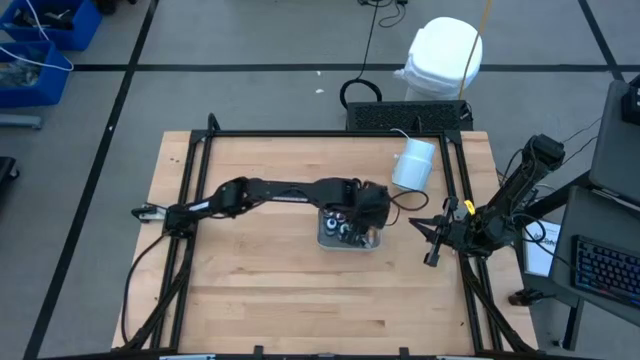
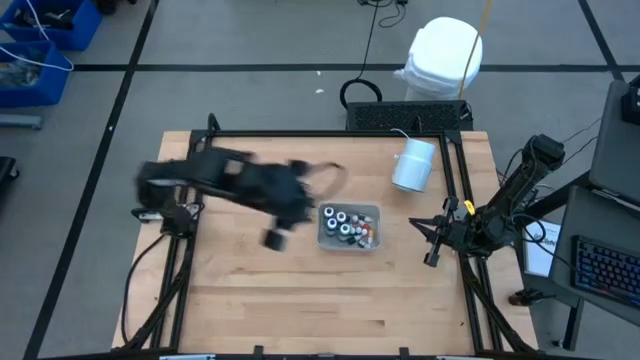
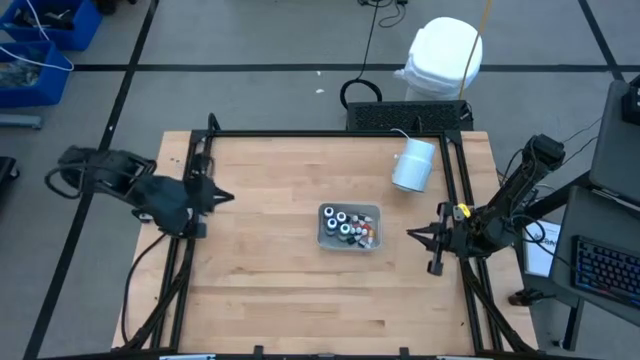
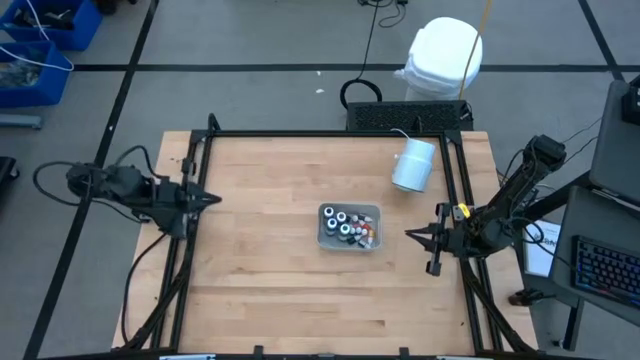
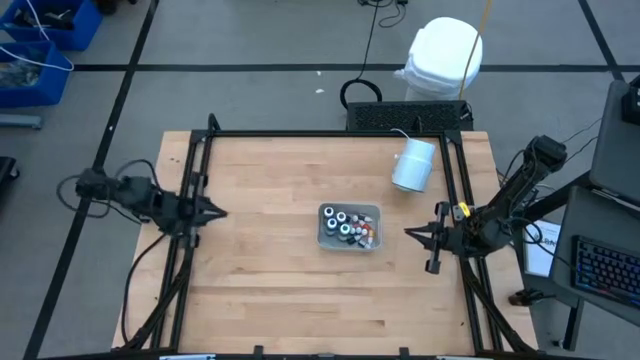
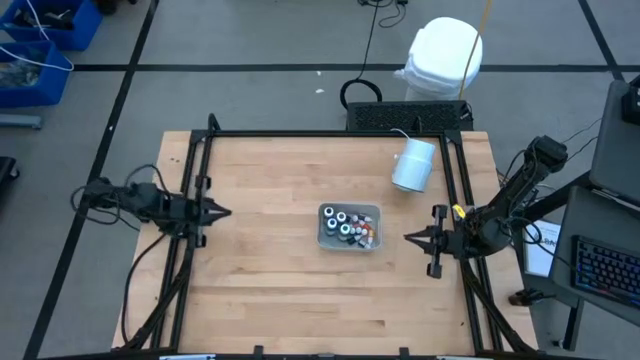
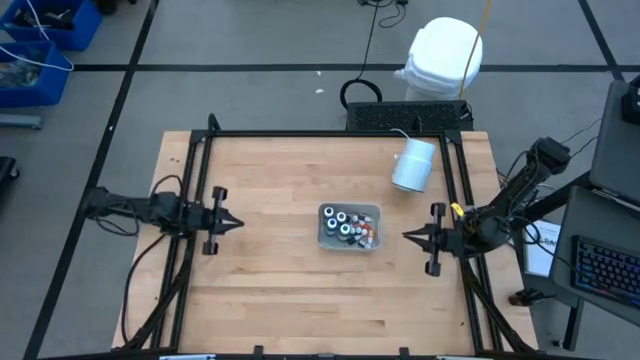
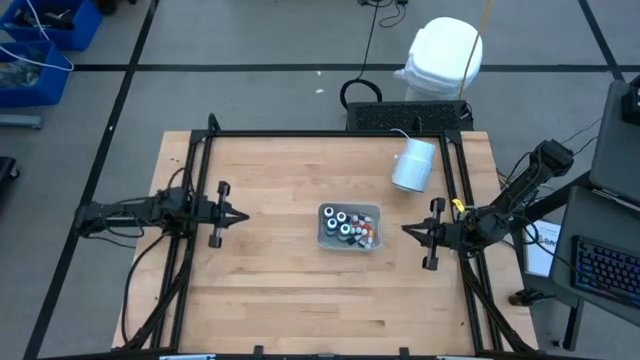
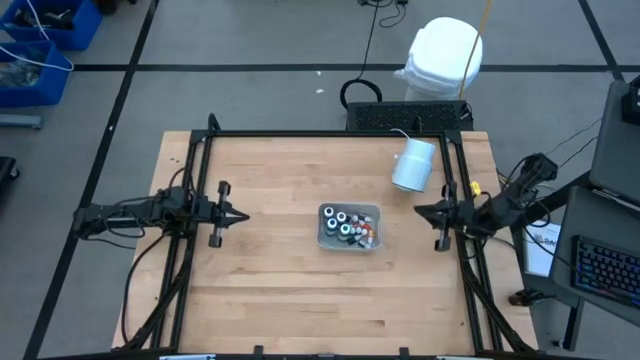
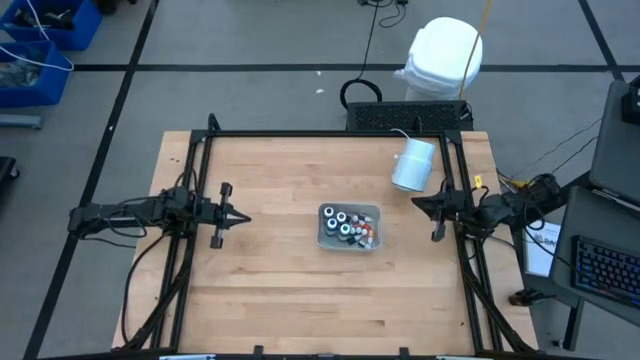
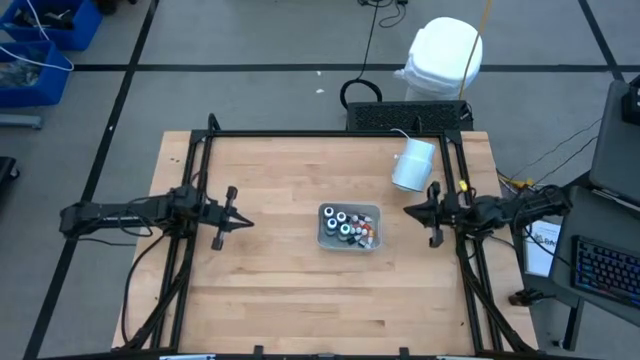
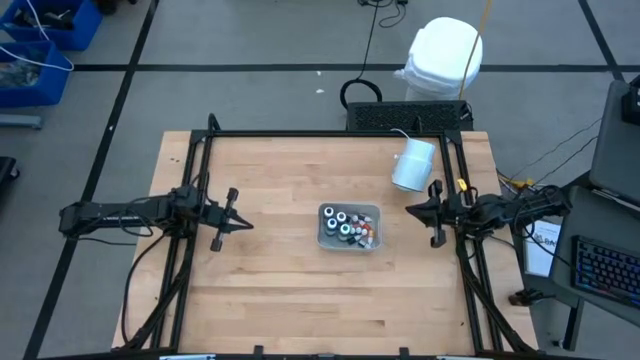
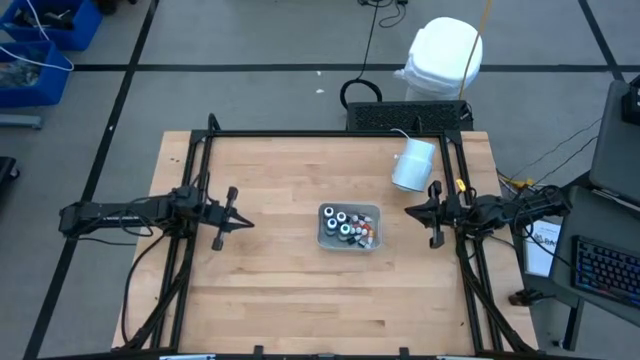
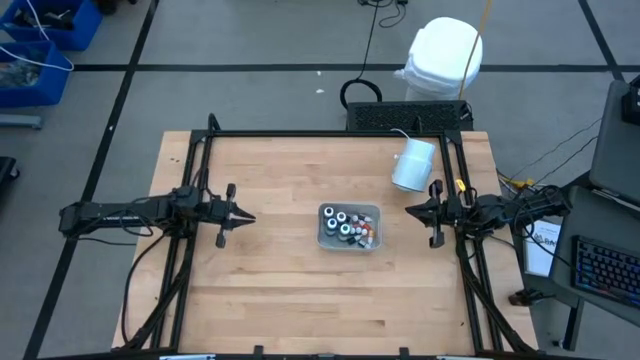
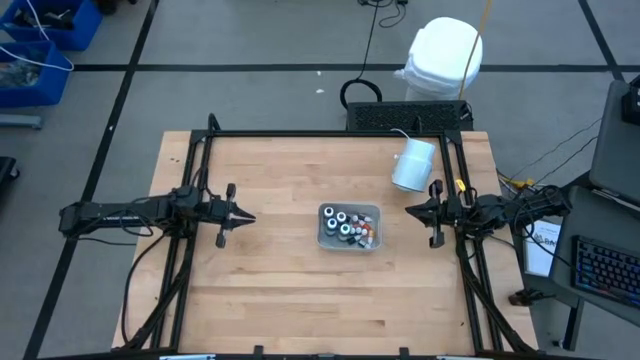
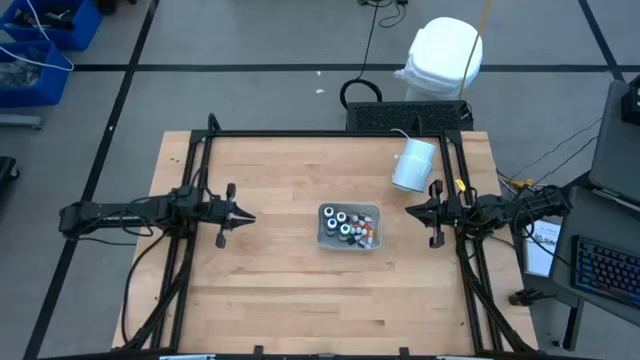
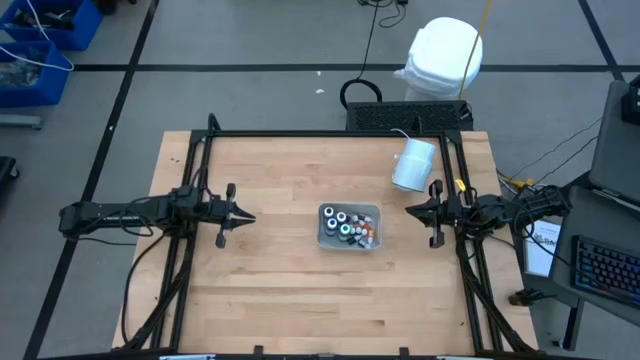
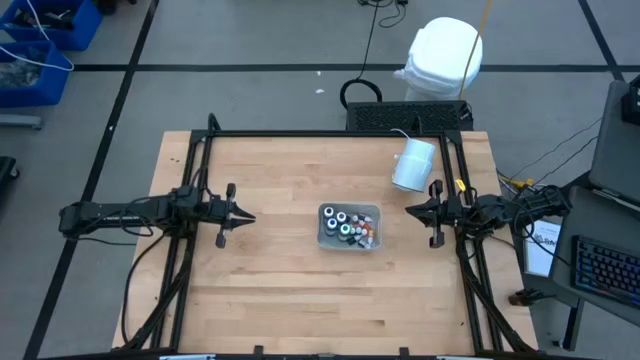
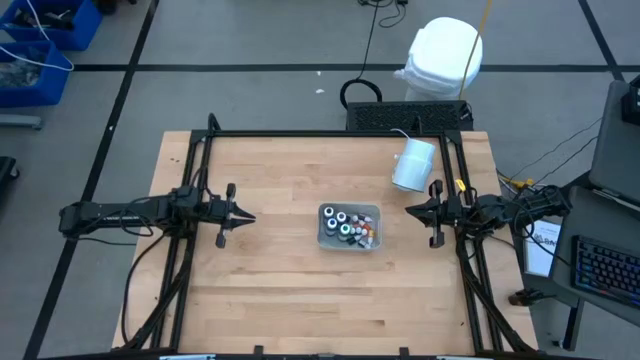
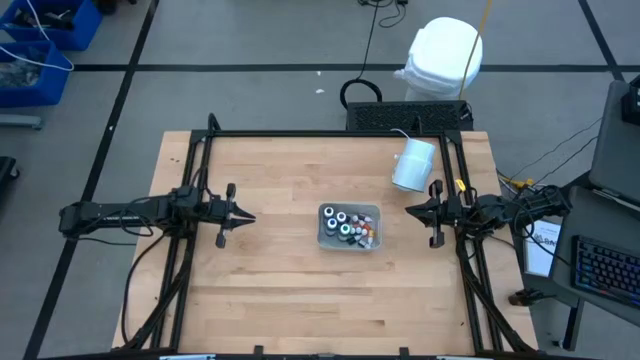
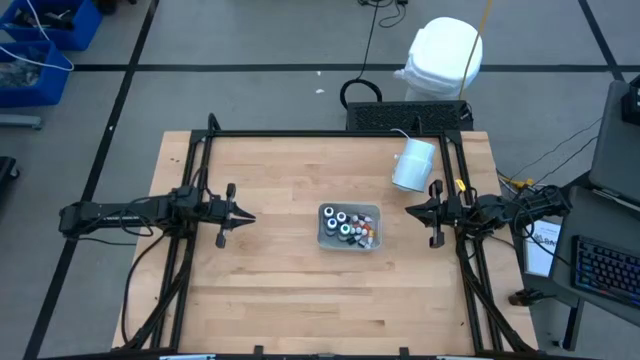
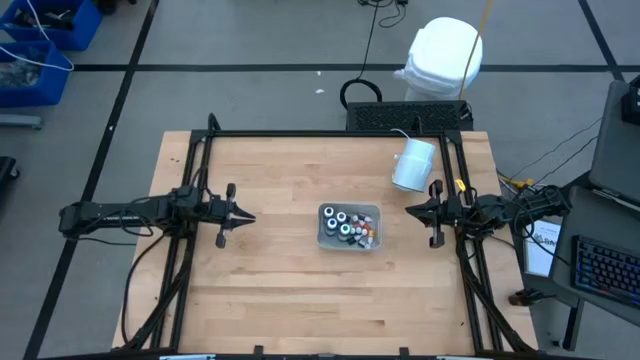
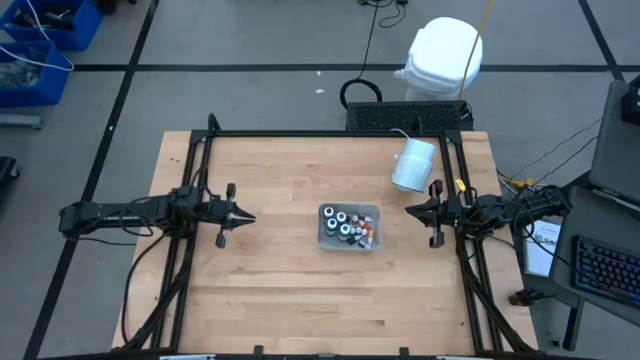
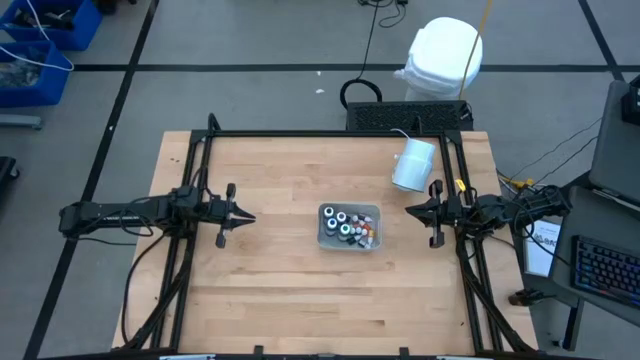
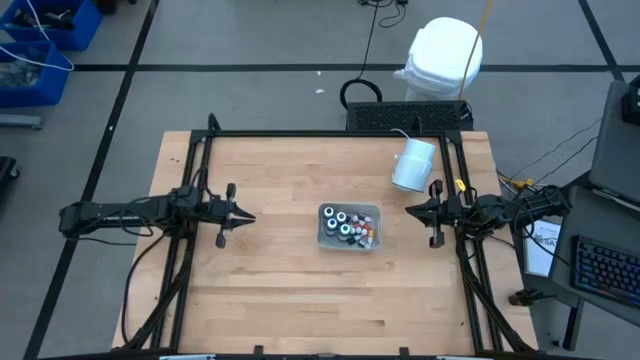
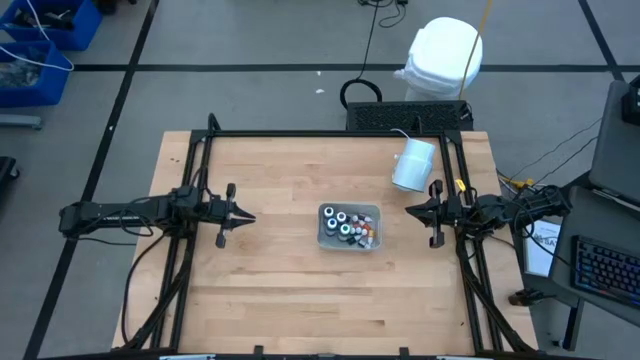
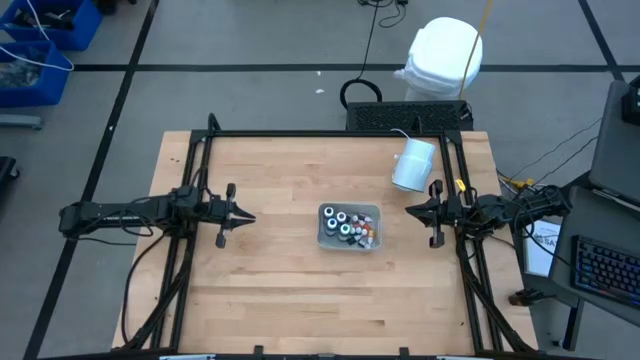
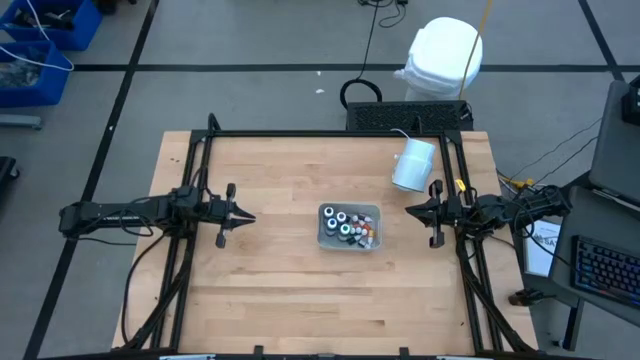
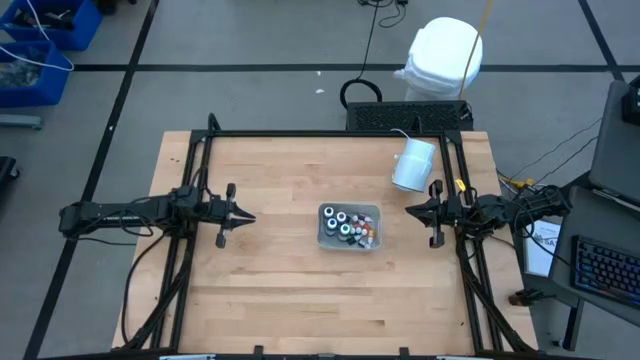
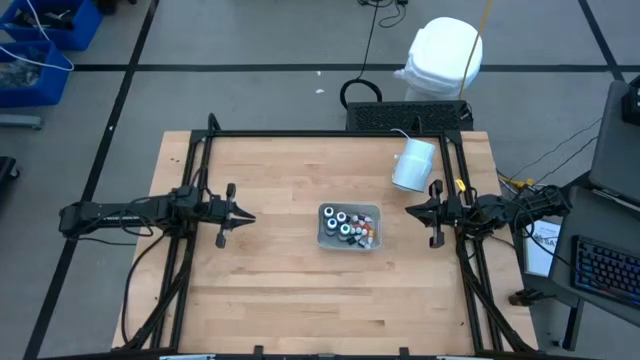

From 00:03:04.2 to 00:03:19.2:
Task: Pick & Place food coloring
Return to Home Position

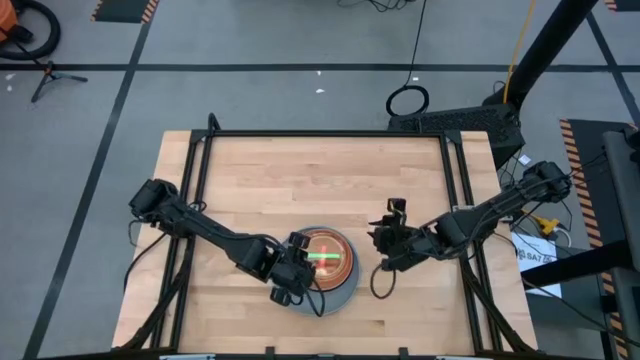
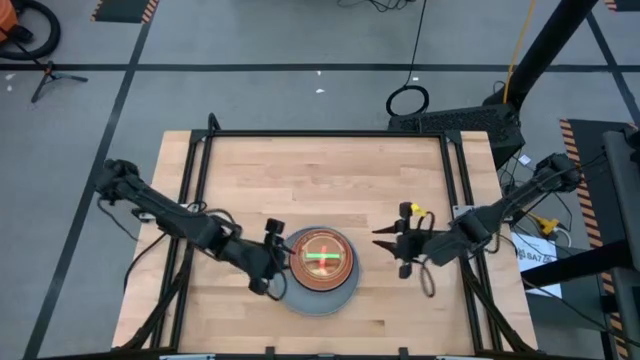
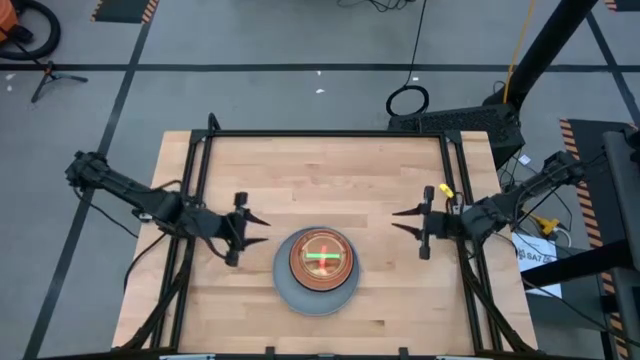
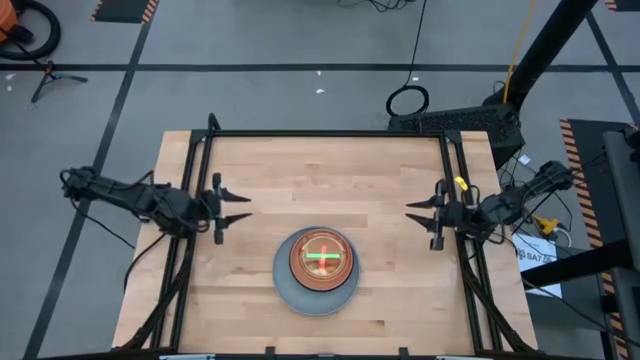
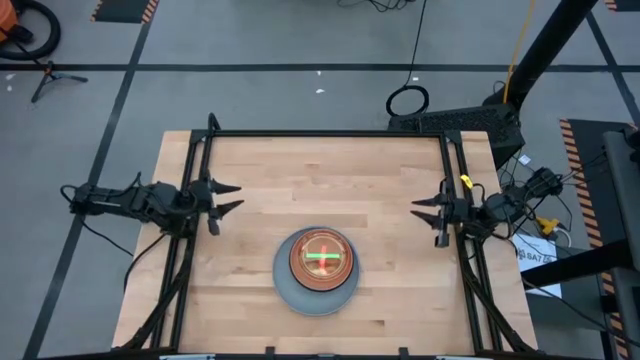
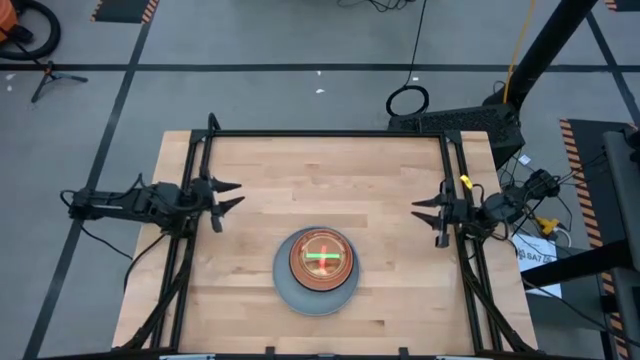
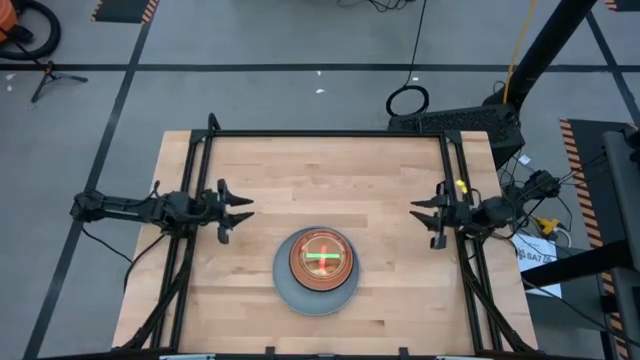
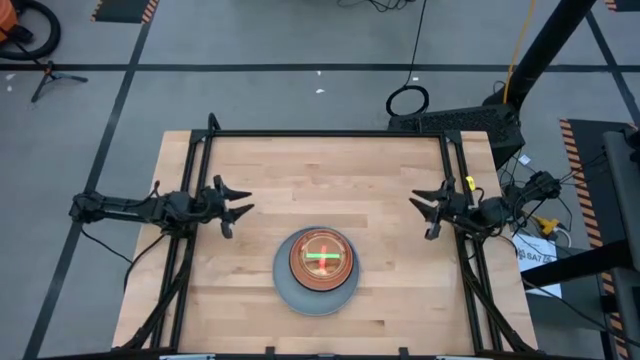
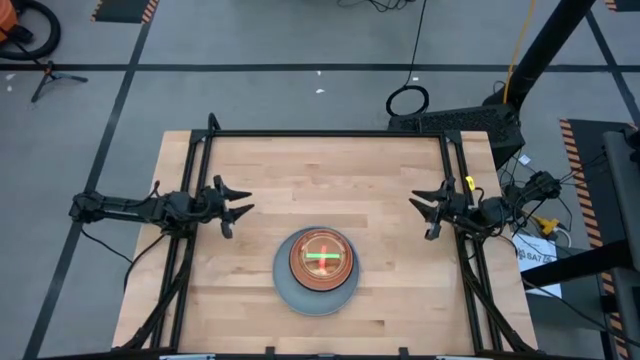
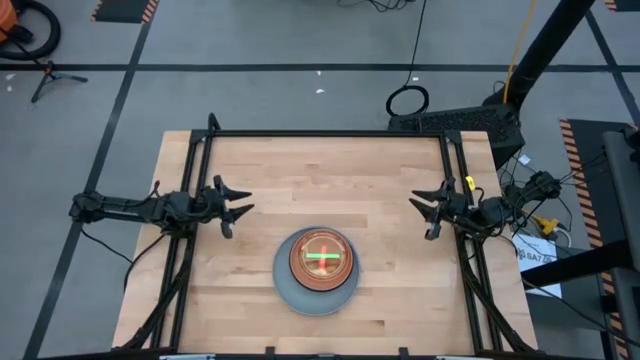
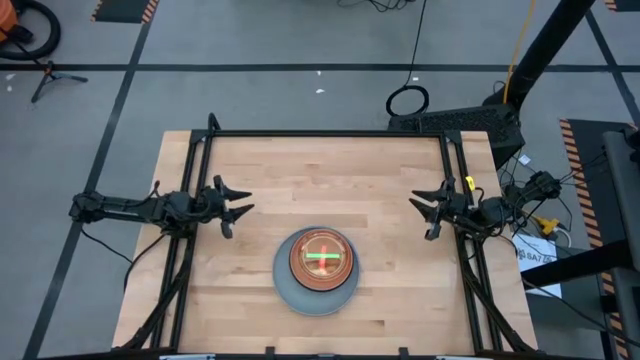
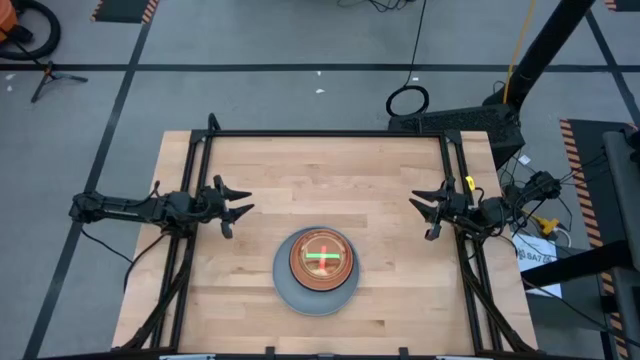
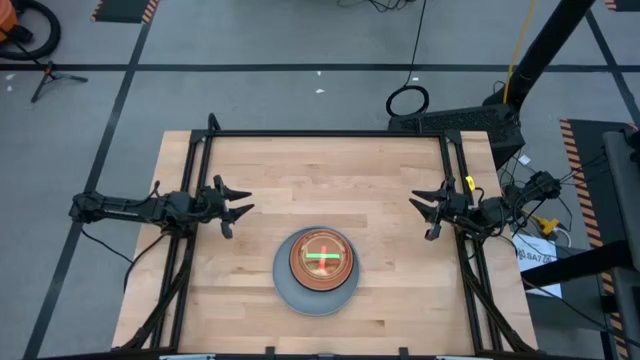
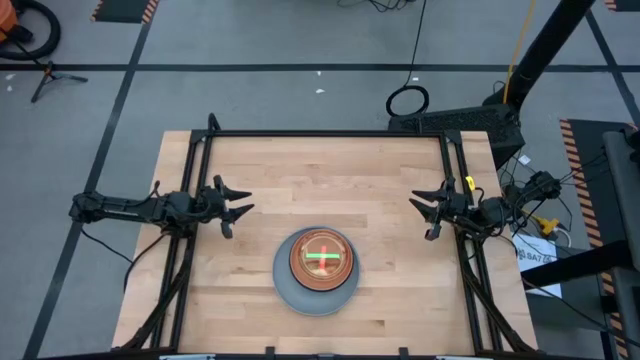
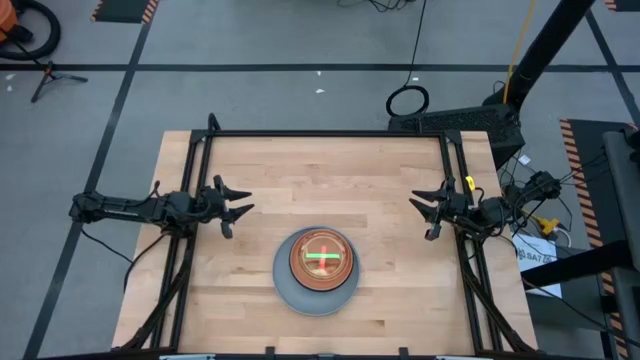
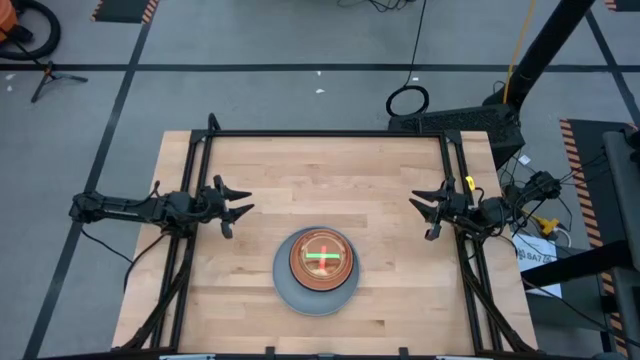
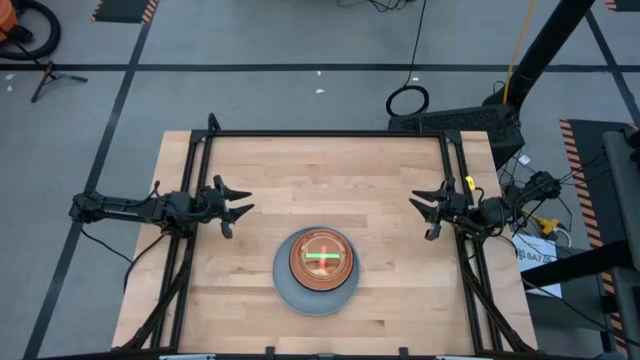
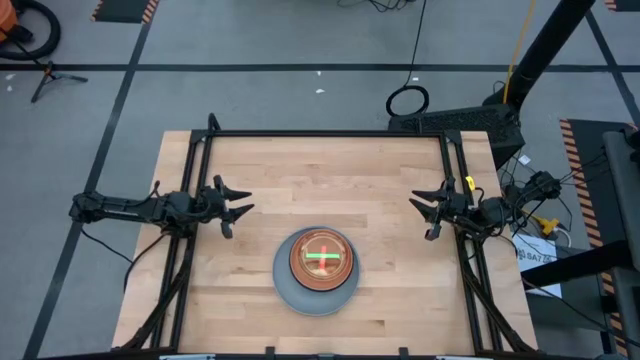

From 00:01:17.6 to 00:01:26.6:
Task: Stack plastic plates
Return to Home Position
